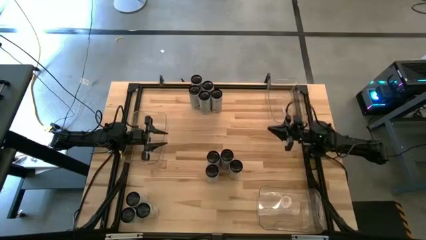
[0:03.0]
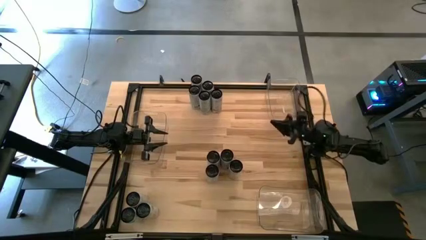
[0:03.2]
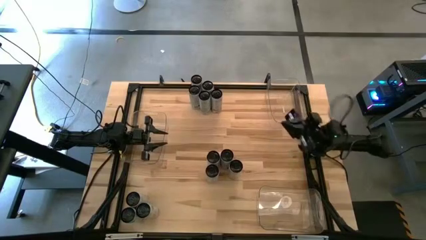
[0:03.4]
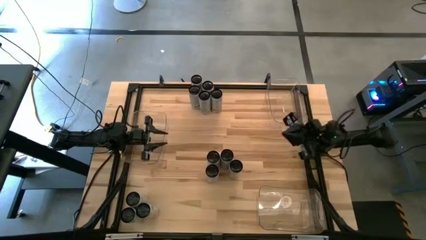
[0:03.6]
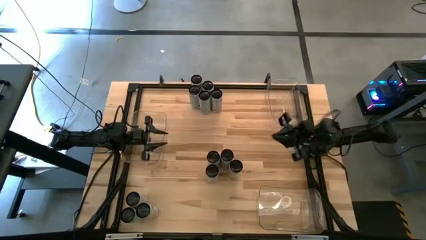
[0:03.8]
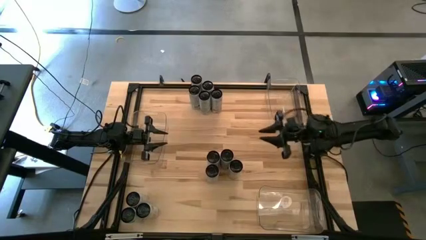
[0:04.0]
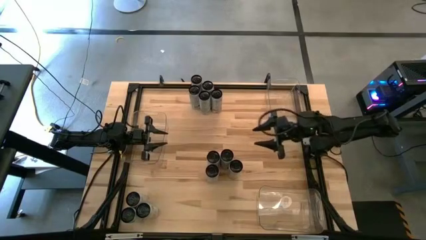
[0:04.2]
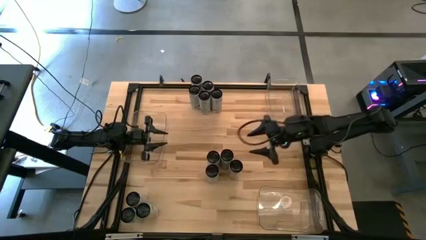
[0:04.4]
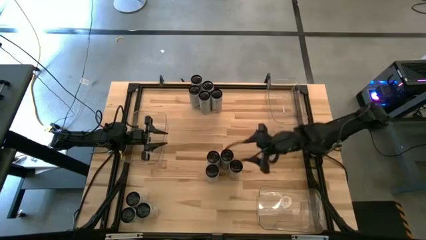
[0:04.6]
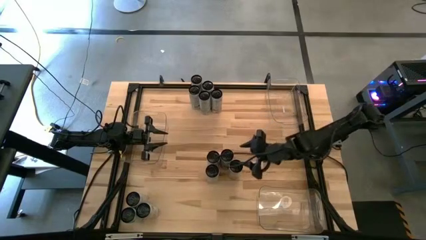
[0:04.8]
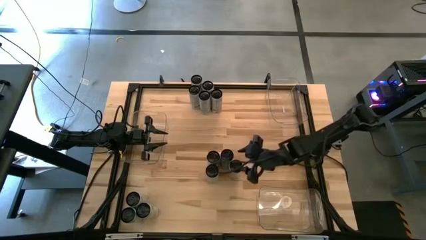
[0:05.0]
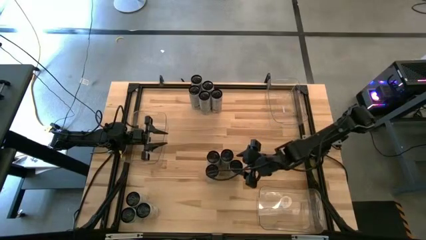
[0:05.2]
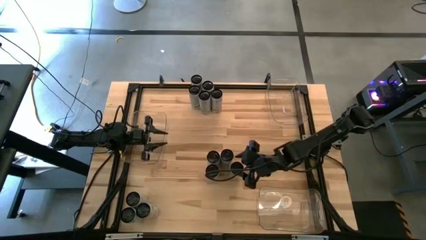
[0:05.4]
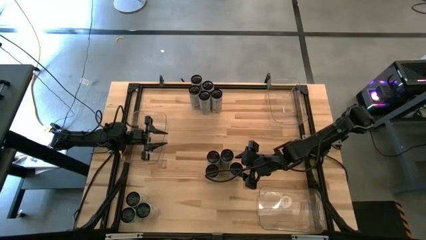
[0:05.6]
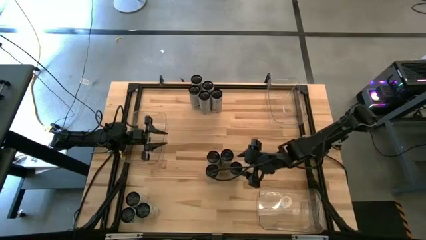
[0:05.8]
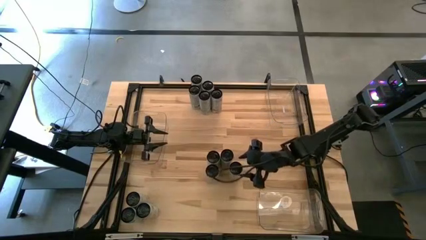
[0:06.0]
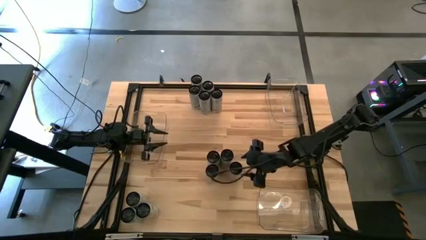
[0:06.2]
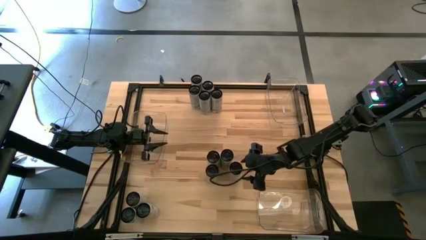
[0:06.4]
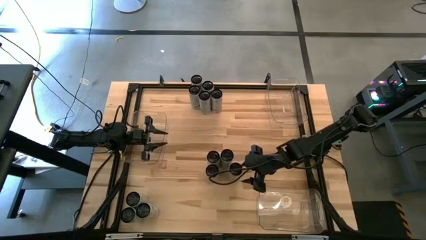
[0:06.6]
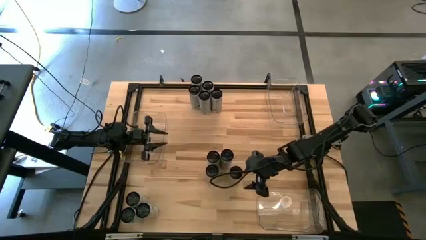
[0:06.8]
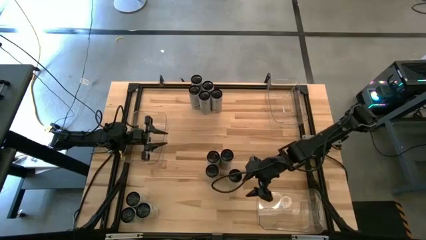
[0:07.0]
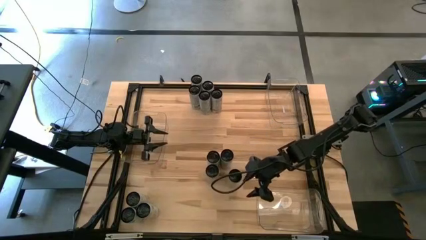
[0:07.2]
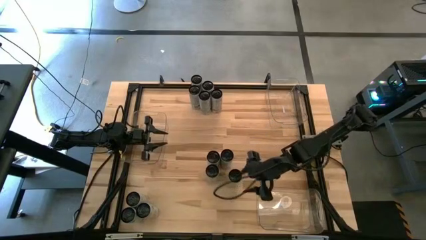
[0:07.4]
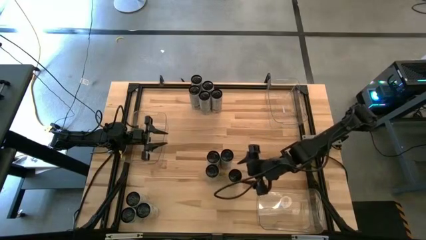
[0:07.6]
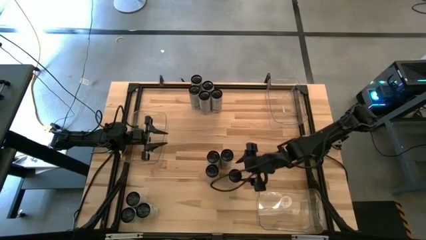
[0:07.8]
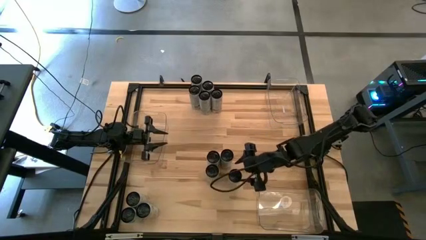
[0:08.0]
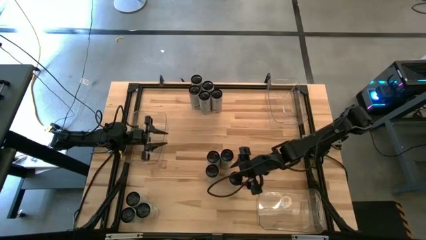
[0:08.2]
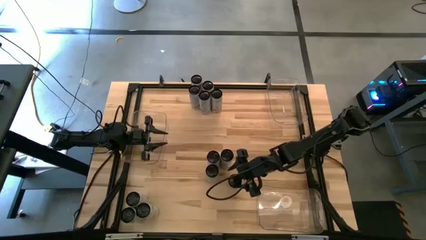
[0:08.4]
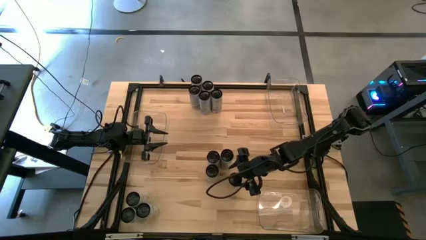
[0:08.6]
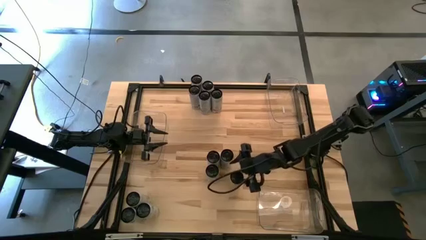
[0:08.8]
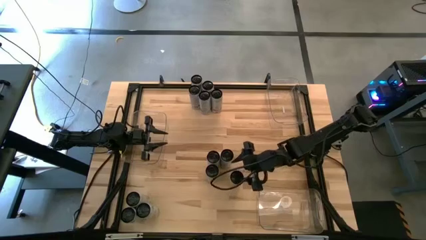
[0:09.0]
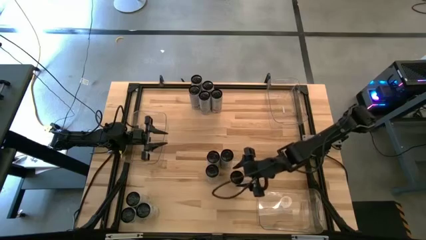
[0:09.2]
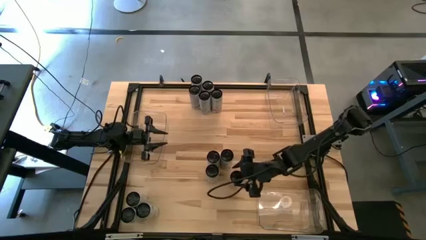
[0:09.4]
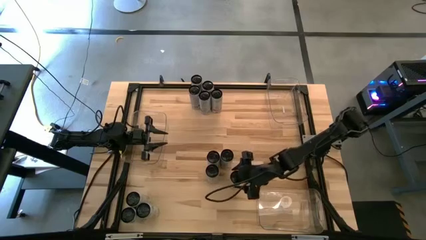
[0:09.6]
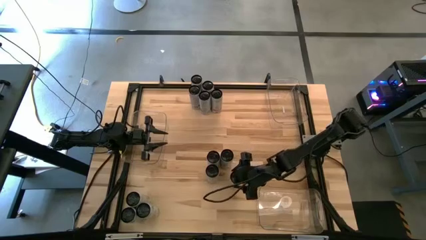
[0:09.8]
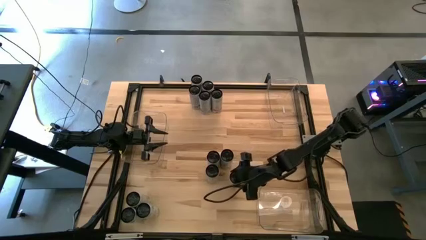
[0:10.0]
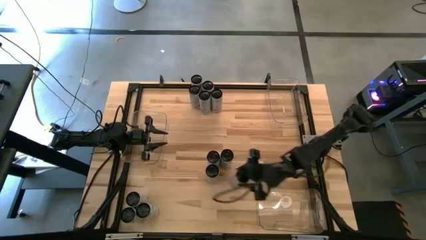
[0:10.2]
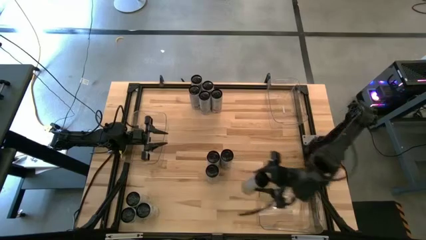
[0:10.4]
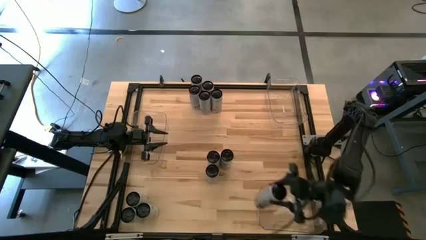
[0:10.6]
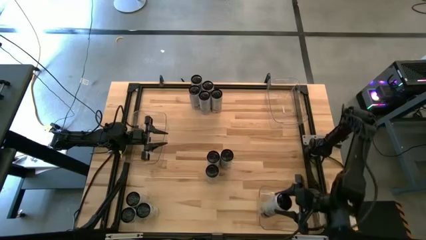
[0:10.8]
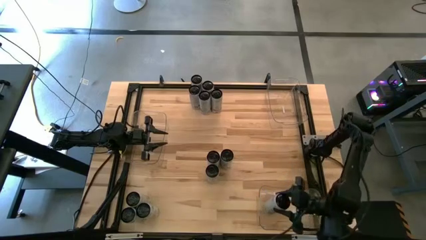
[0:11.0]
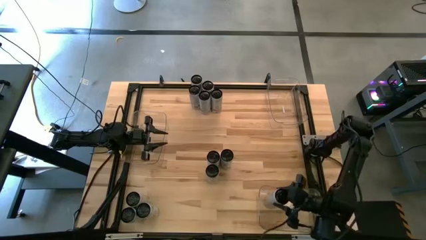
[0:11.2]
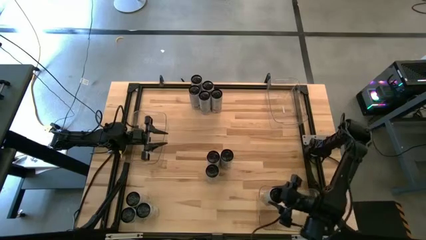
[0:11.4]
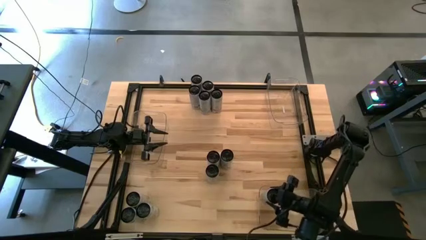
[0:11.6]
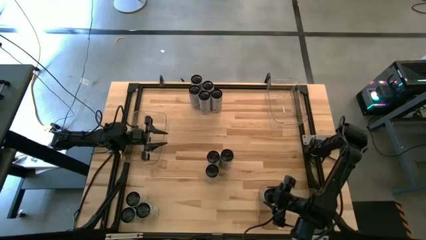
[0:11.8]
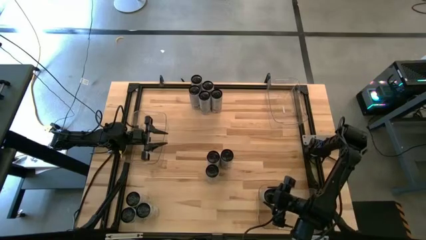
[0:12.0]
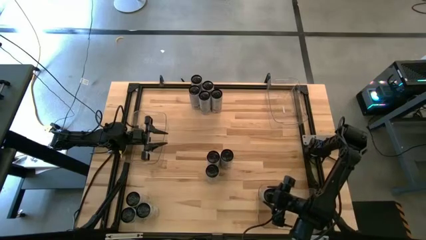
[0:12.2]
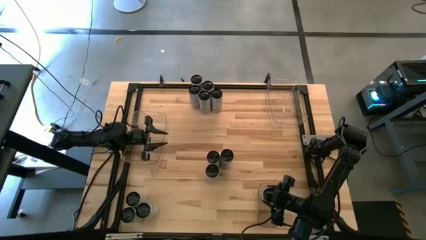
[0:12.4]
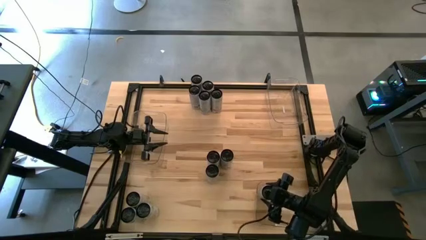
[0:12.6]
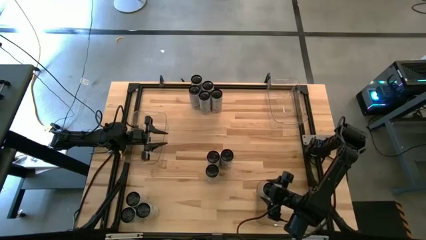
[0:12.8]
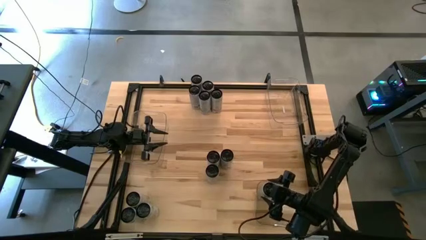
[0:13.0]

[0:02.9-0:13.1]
Task: Sort soda cans
Put the white-yellow soda can into the bottom transparent bin

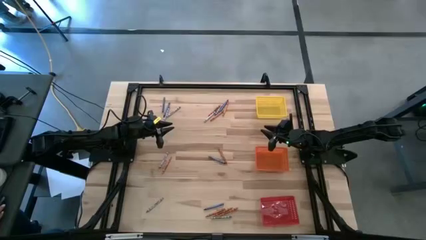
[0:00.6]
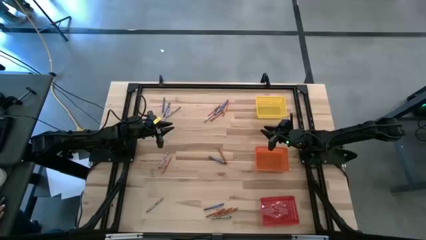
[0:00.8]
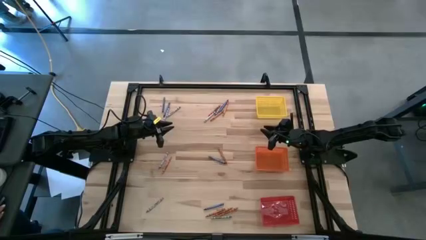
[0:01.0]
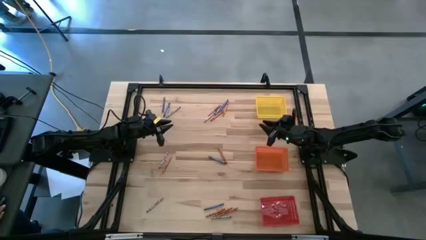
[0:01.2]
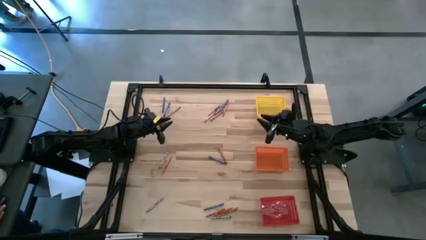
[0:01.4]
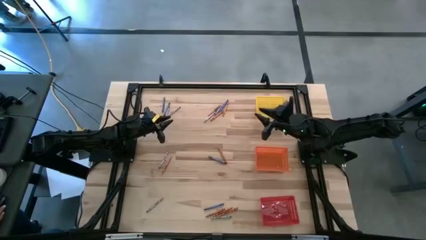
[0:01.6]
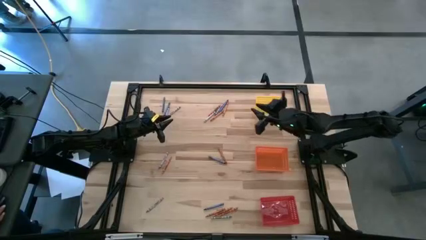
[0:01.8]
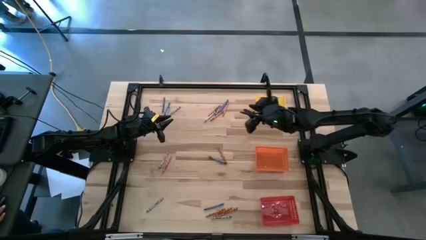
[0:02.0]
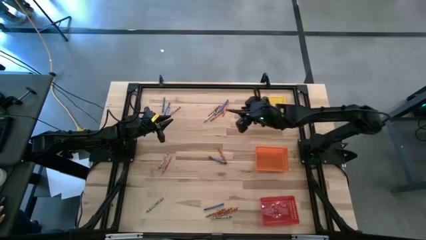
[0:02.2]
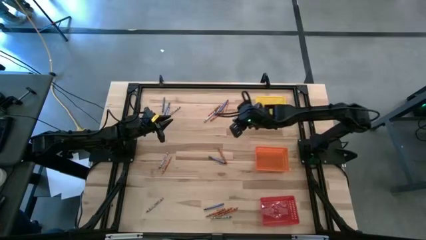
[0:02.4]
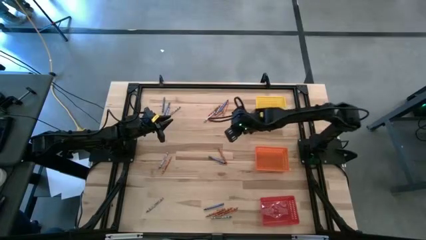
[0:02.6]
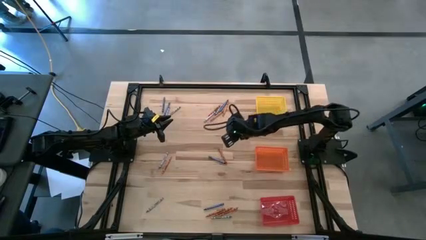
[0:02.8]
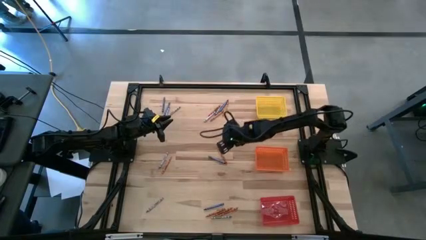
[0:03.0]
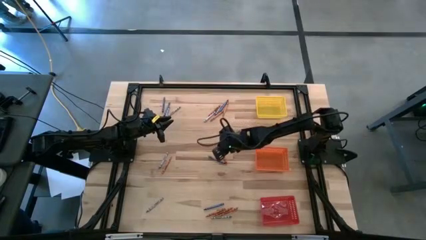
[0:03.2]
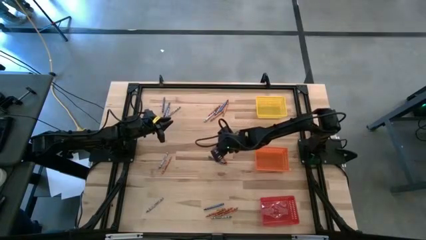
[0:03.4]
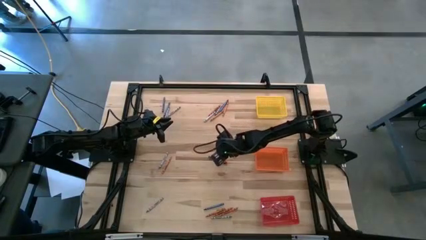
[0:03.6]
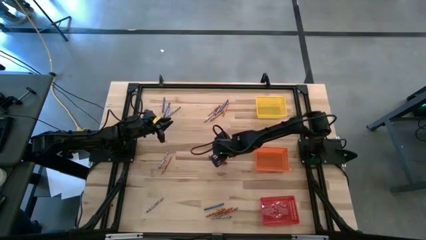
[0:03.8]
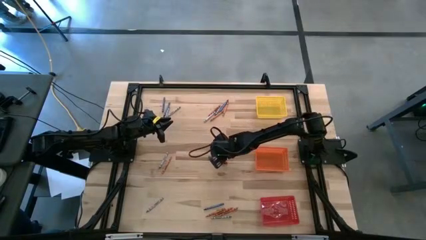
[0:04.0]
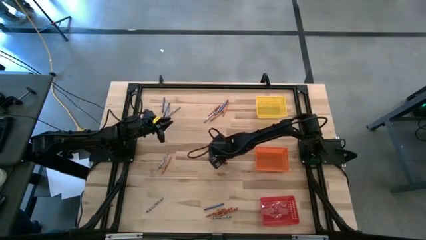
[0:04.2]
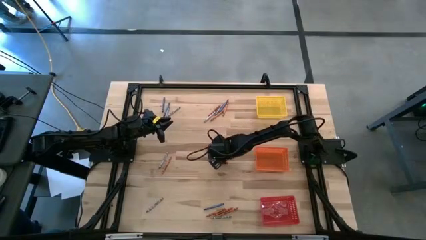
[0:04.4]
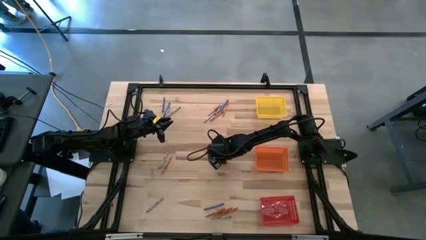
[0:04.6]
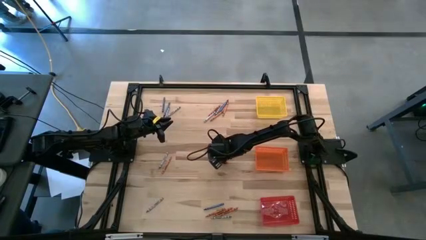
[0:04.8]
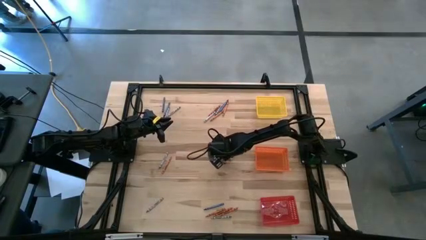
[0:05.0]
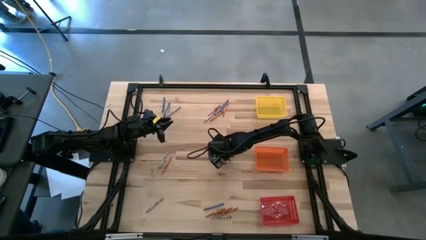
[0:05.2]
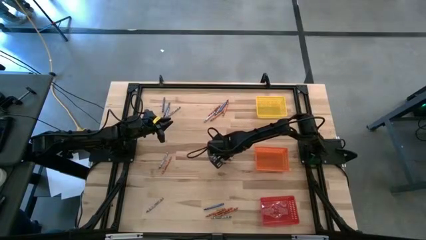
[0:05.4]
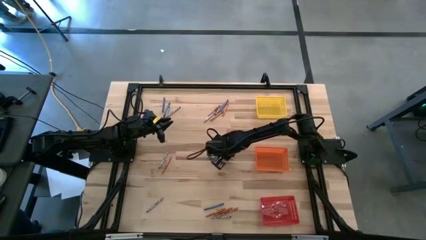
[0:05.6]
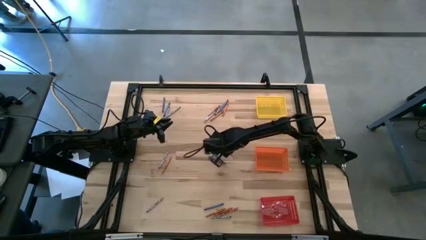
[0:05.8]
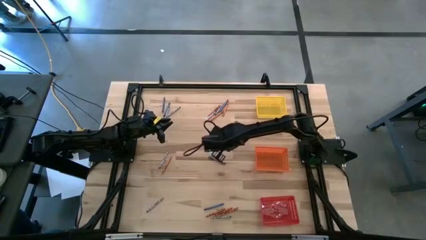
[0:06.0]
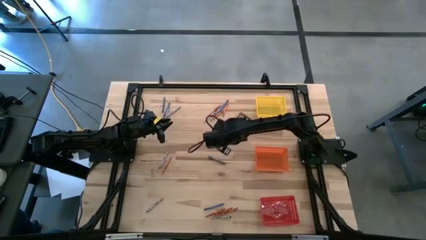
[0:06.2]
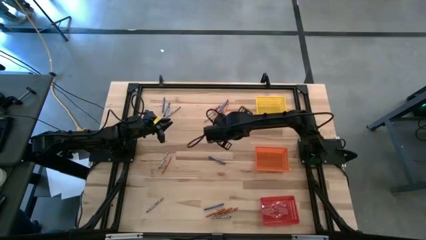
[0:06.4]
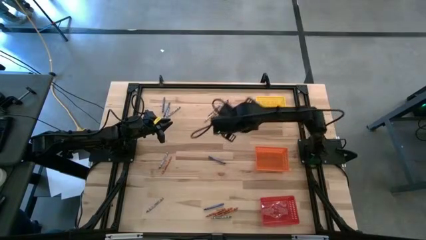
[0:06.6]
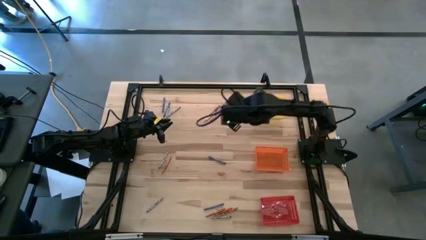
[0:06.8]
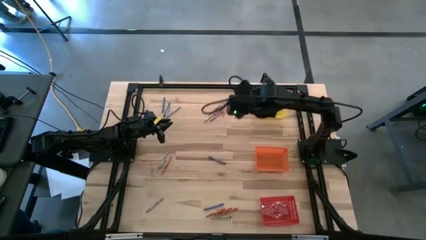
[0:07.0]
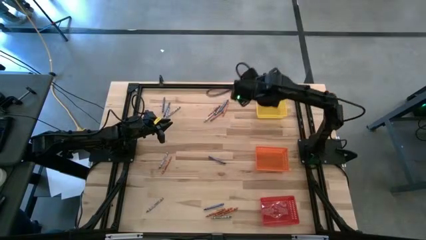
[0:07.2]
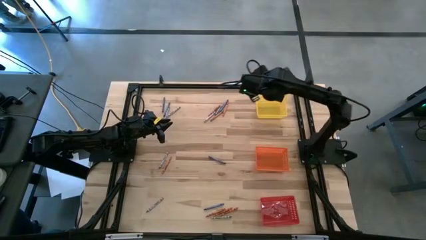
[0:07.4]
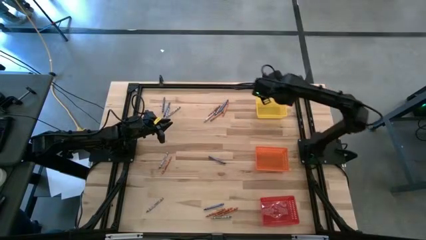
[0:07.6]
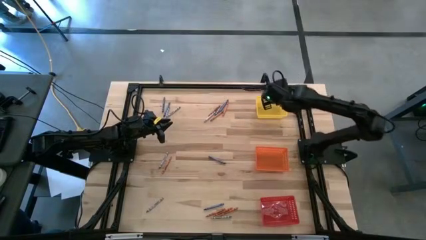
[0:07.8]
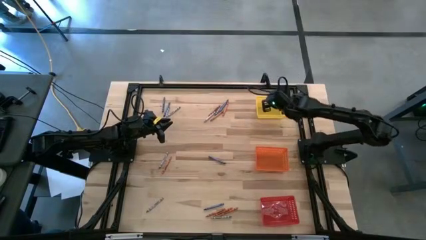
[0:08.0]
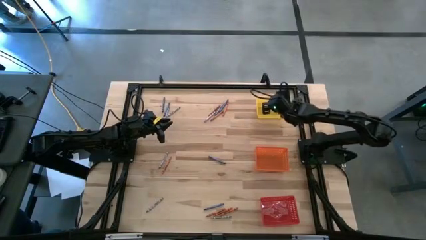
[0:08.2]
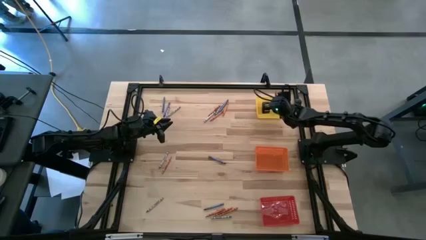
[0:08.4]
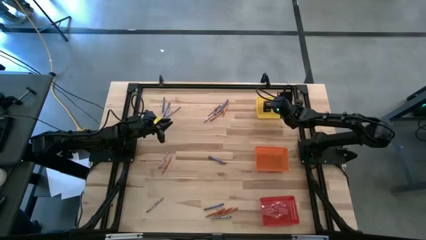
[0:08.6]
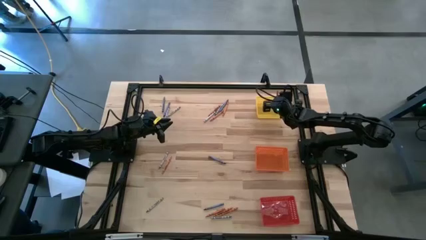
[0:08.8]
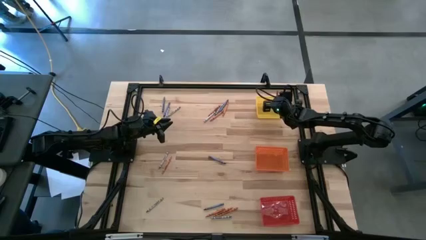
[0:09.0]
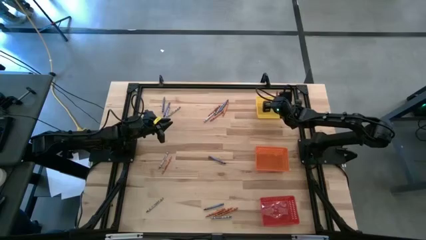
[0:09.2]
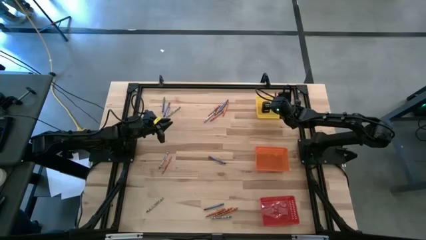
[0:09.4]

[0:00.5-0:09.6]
Task: Sort crayons
Put the orange crayon into the yellow bin
